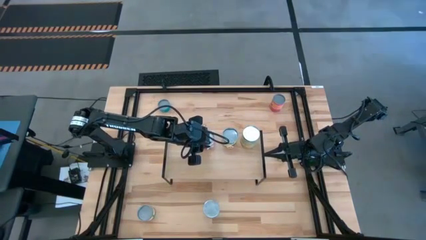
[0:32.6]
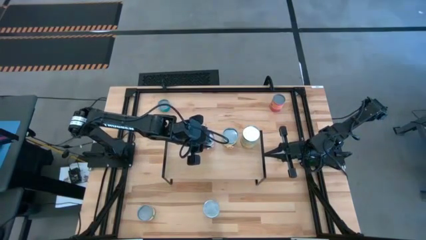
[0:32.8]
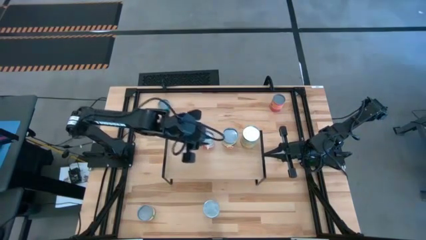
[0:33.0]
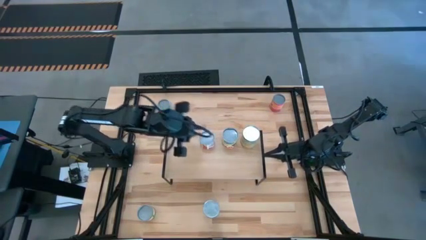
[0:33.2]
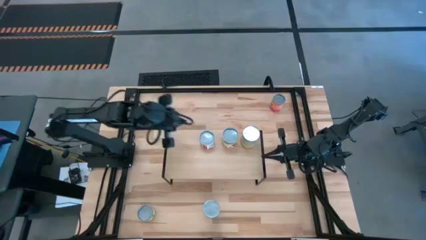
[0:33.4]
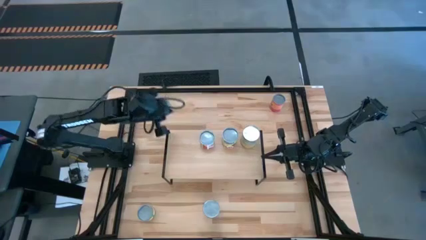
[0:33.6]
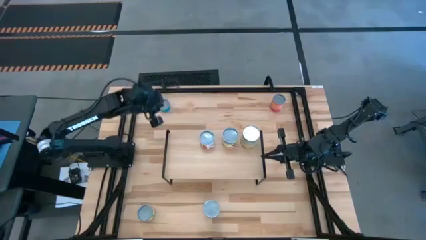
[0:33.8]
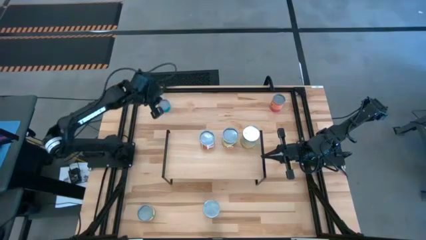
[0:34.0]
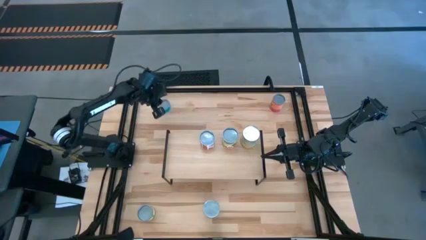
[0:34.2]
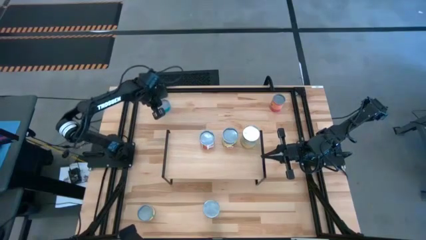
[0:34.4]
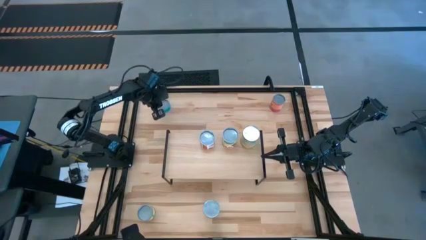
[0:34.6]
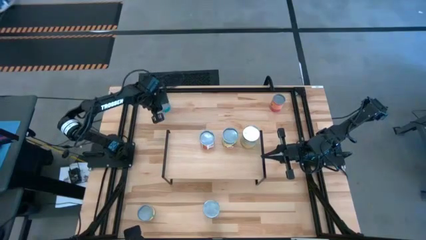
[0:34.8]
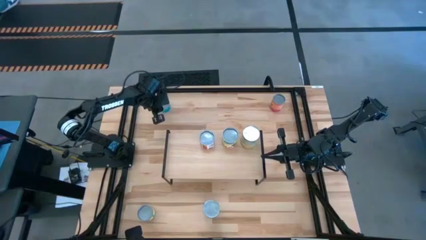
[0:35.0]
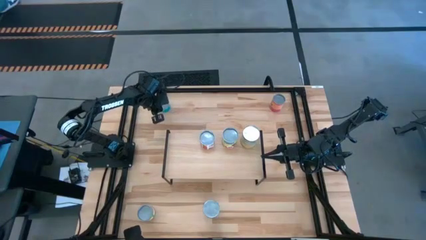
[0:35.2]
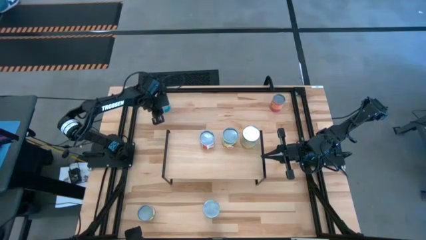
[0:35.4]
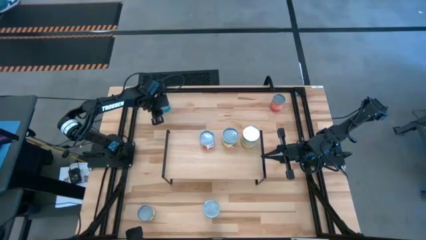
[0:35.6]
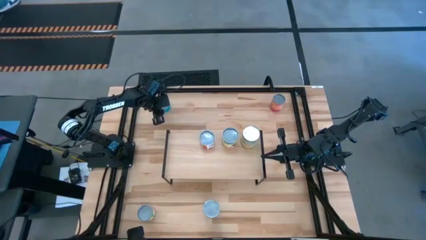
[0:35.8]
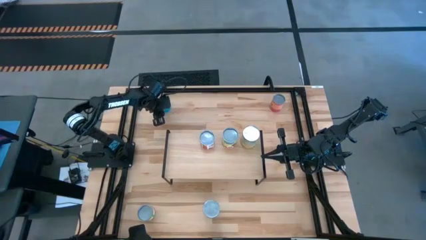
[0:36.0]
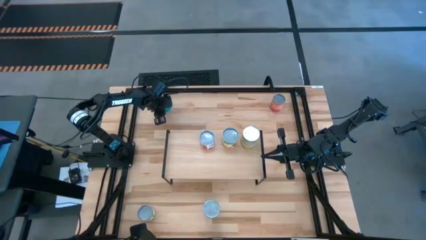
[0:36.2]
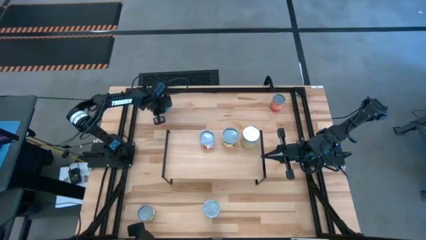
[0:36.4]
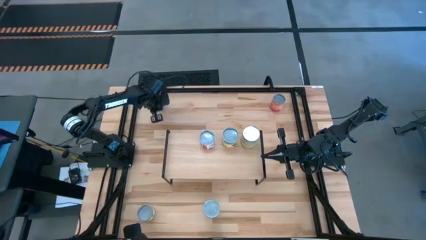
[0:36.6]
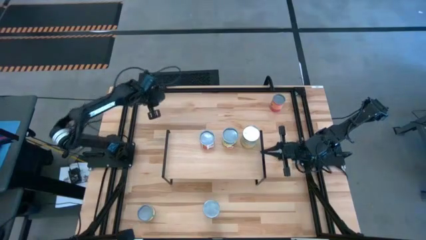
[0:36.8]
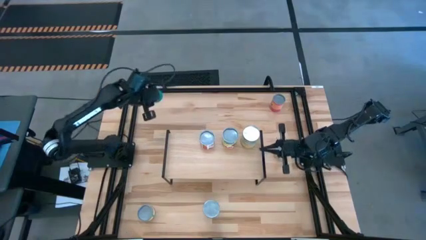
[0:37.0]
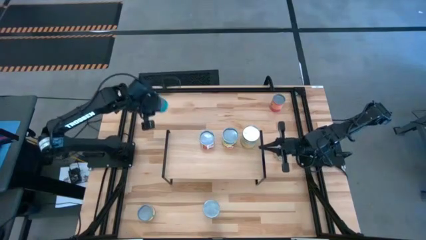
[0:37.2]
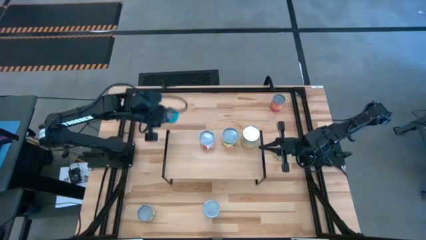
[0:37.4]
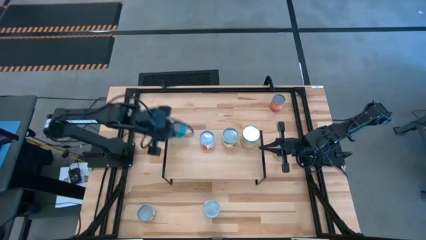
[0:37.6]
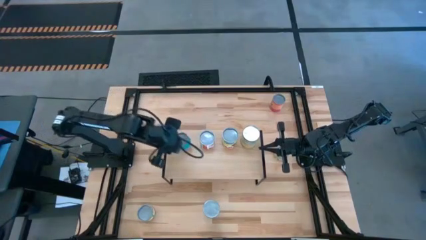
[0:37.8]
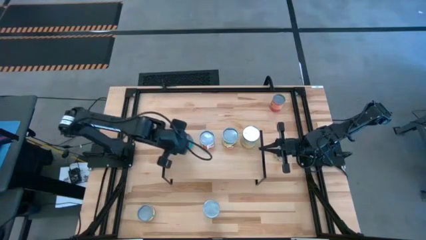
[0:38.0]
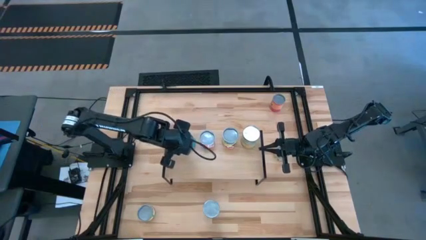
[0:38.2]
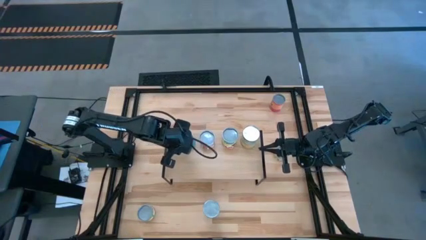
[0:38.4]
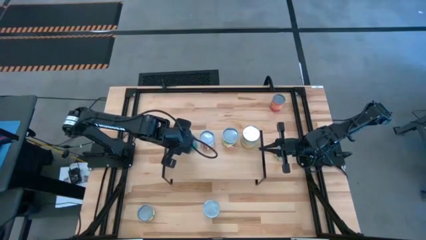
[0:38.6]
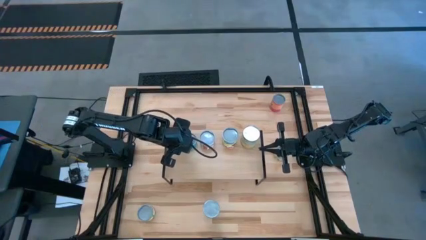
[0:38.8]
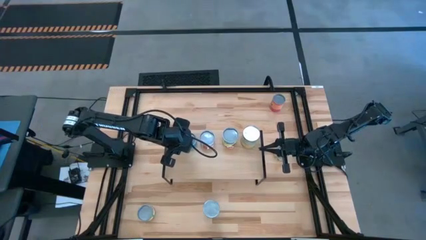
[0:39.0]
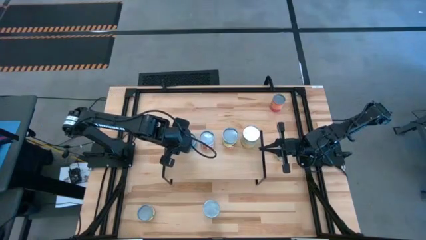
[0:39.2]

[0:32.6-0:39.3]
Task: Pick and place cans onto a shelf
Put the canned tuna on the shelf

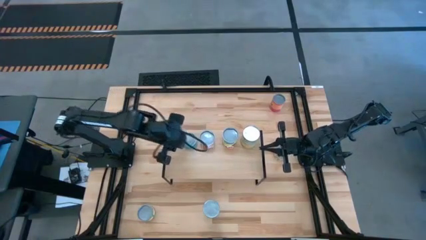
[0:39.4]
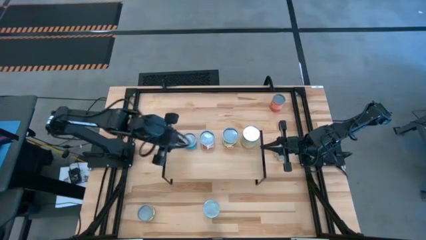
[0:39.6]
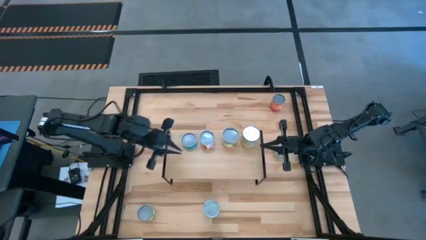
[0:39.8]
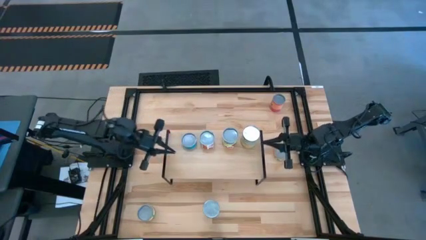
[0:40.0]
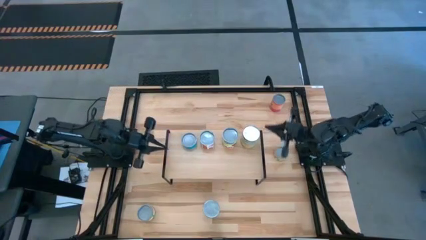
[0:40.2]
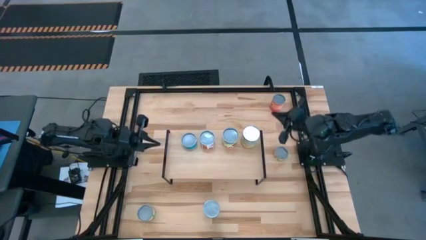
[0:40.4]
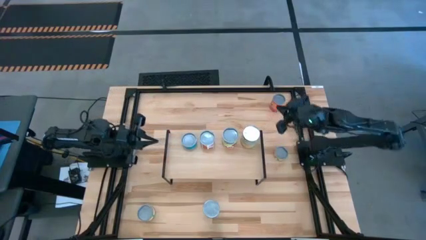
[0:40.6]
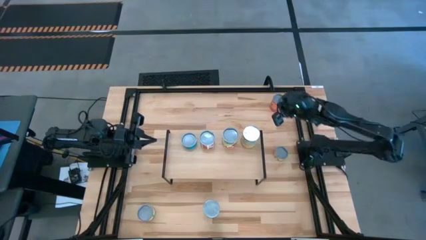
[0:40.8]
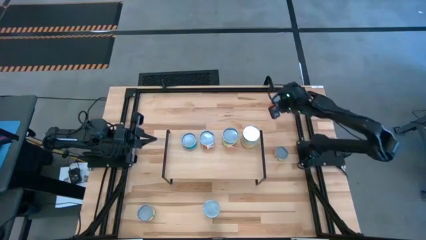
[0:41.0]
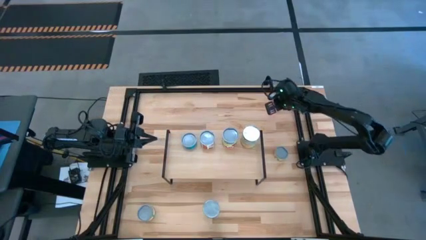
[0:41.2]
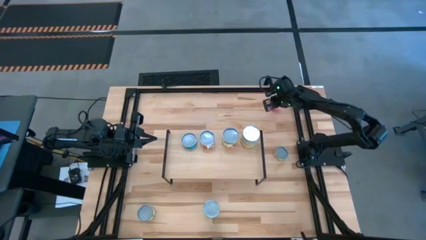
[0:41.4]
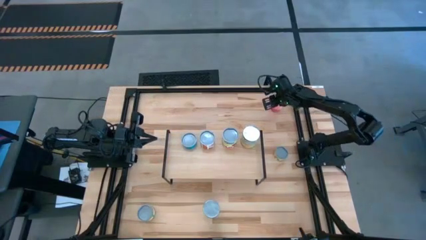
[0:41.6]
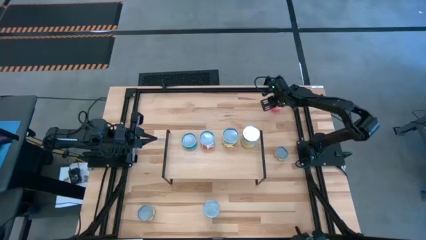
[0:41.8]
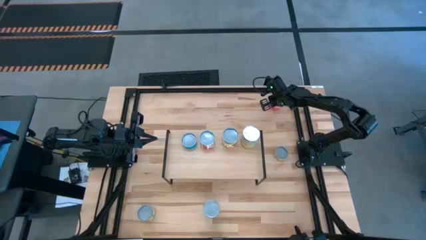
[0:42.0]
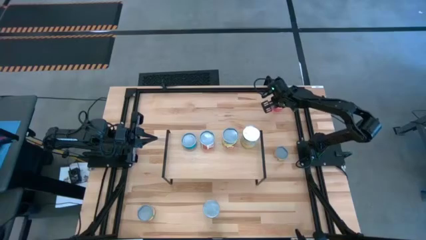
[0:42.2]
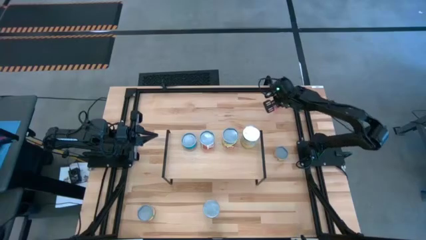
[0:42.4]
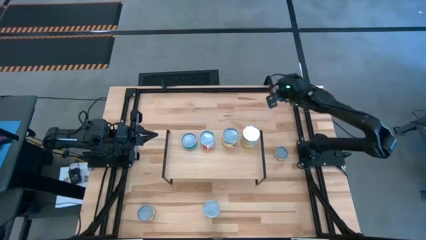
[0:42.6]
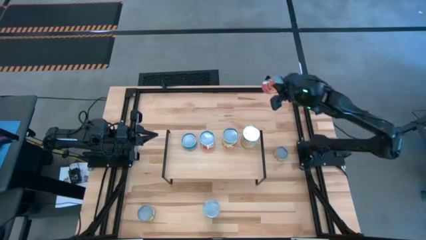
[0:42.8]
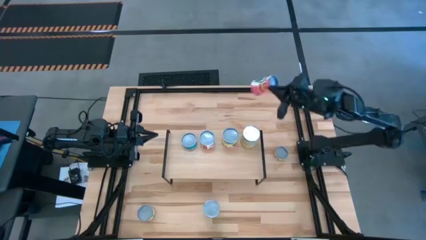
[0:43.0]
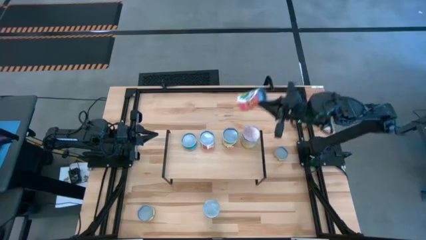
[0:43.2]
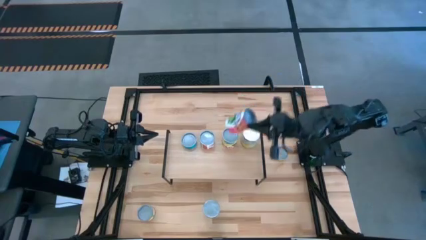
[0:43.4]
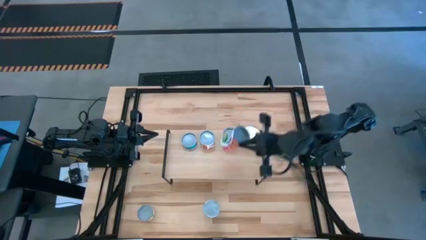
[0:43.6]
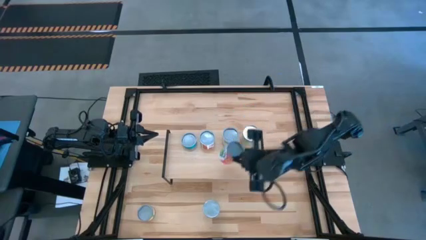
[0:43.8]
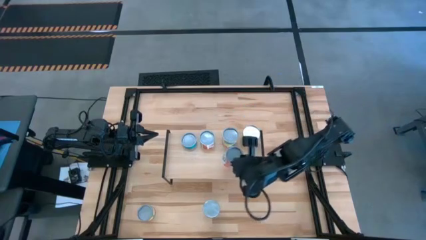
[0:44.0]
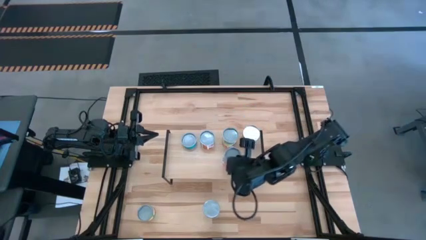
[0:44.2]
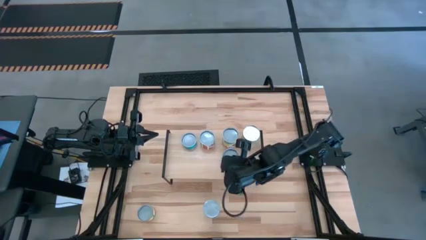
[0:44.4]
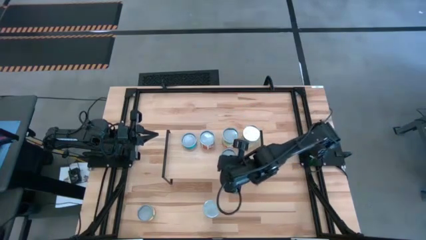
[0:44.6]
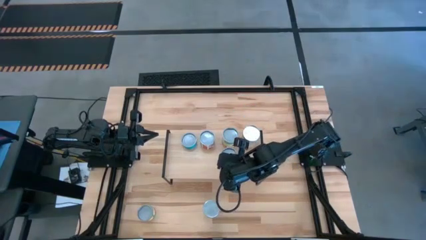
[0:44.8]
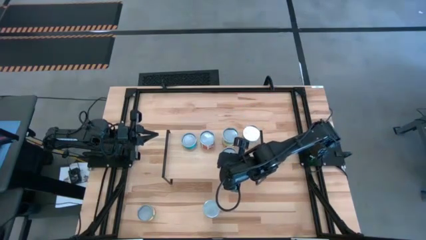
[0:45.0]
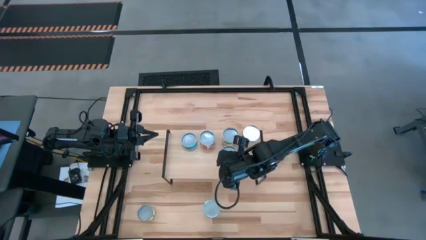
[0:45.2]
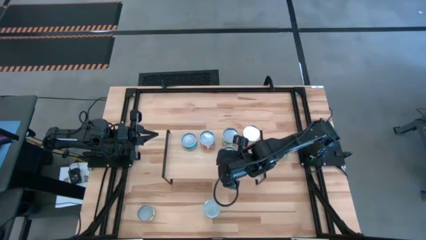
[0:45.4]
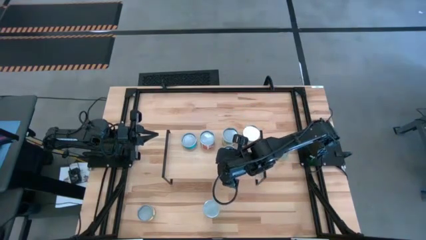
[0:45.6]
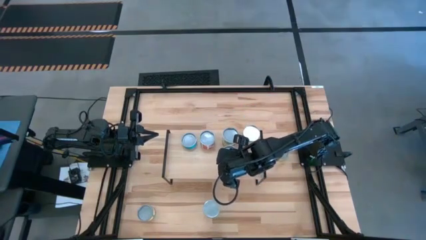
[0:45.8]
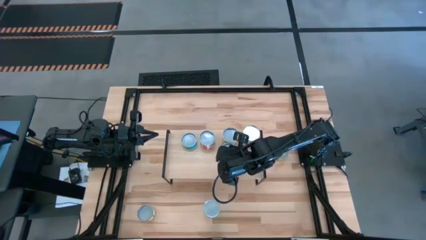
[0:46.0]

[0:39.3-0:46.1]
Put the canned mixed fruits on the shelf
